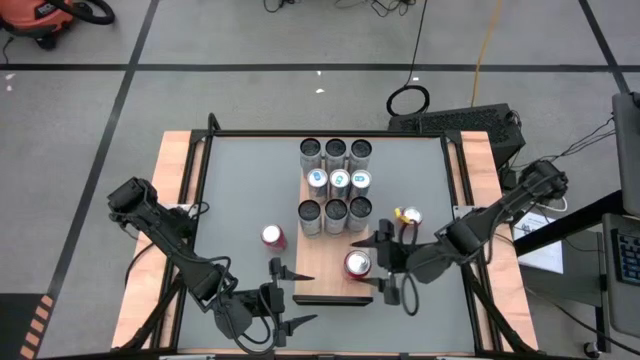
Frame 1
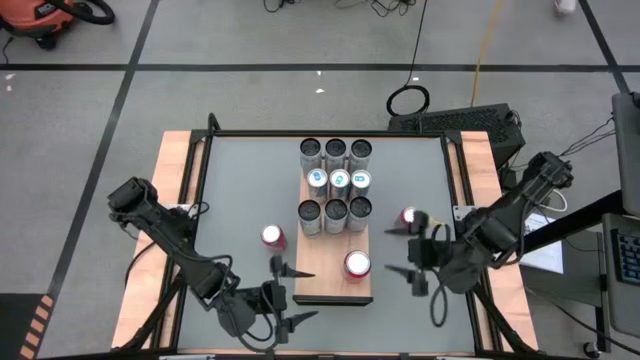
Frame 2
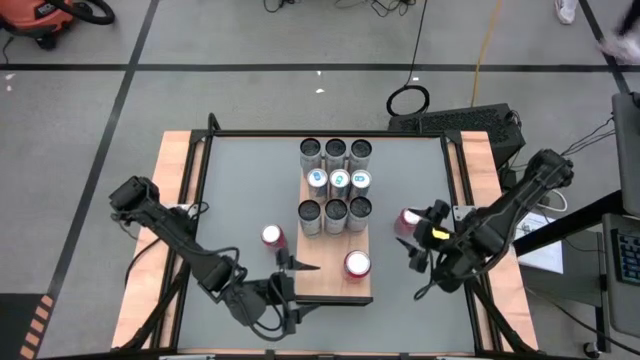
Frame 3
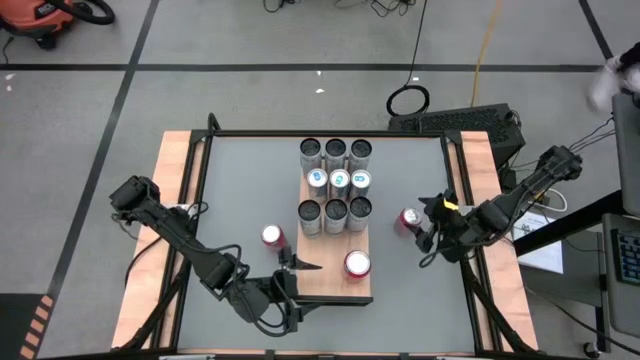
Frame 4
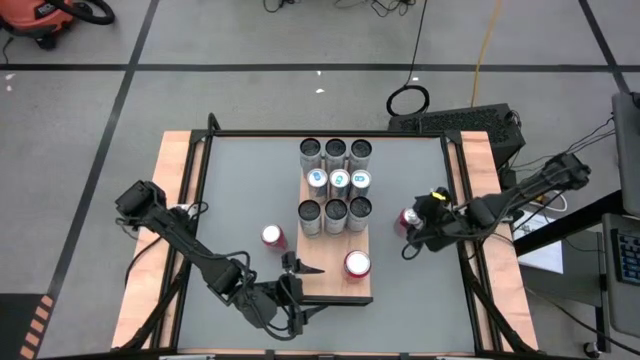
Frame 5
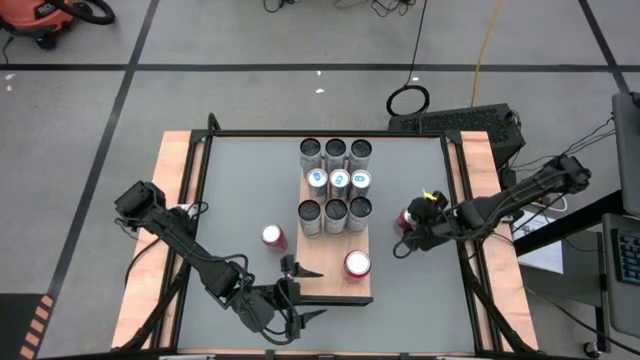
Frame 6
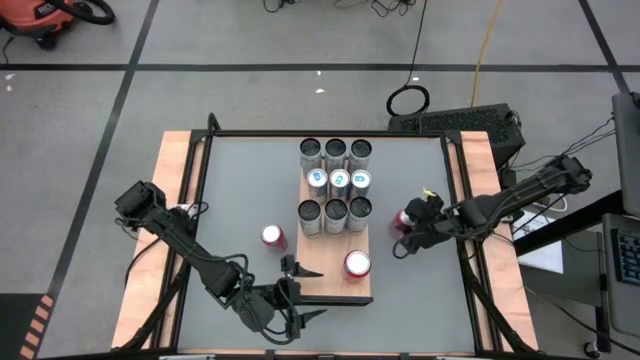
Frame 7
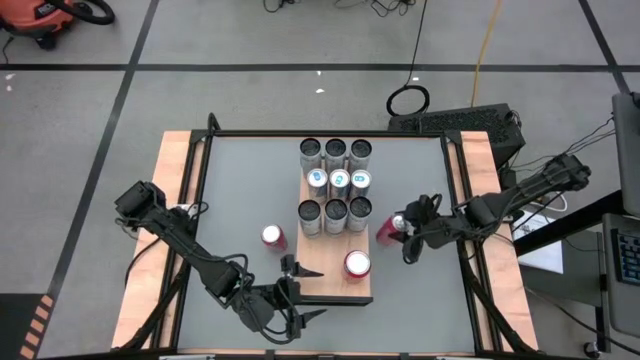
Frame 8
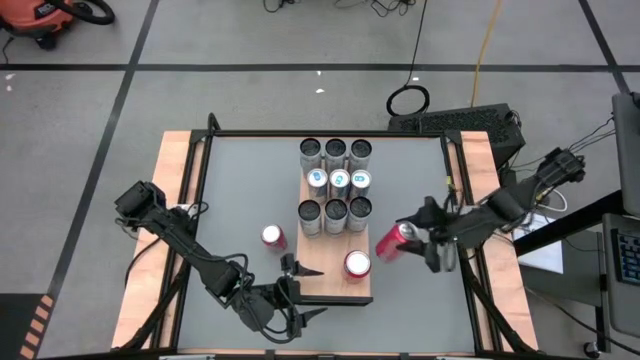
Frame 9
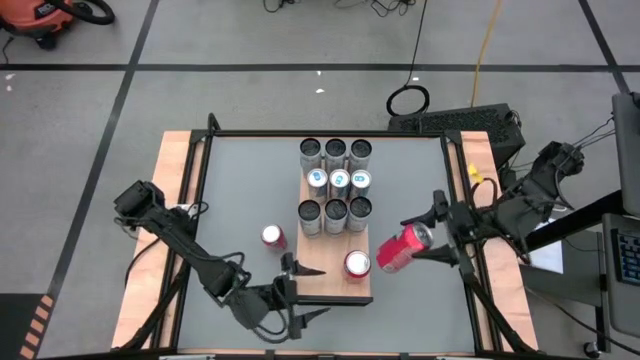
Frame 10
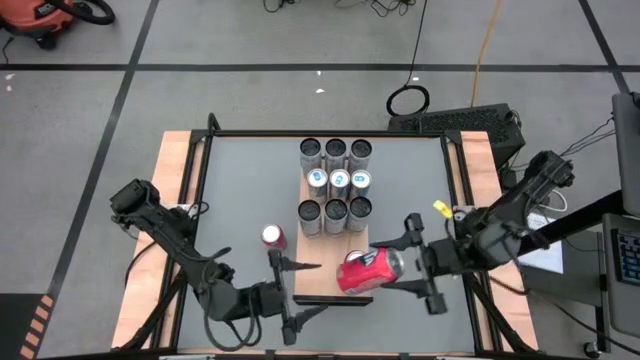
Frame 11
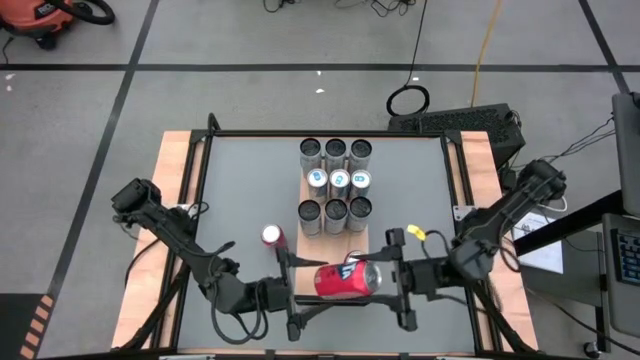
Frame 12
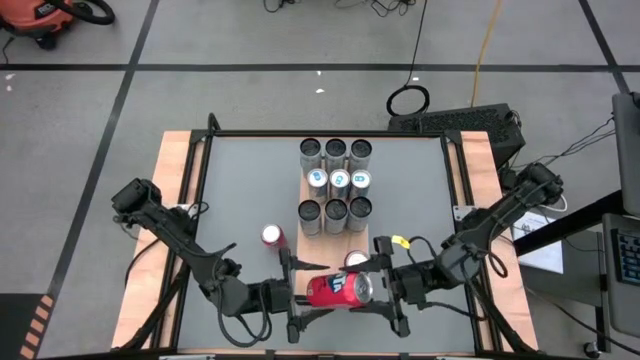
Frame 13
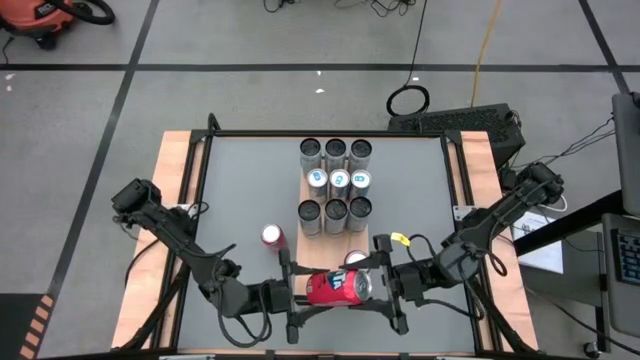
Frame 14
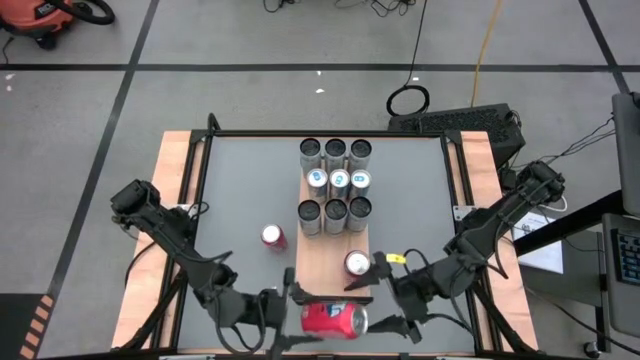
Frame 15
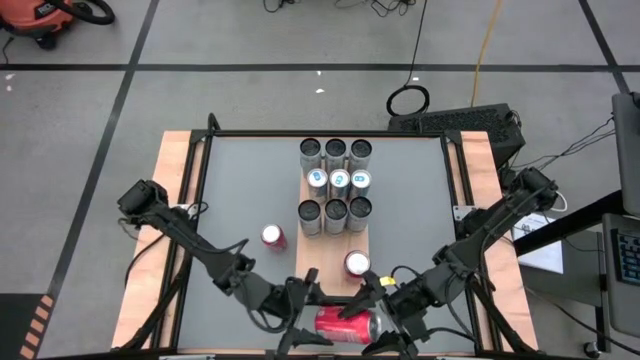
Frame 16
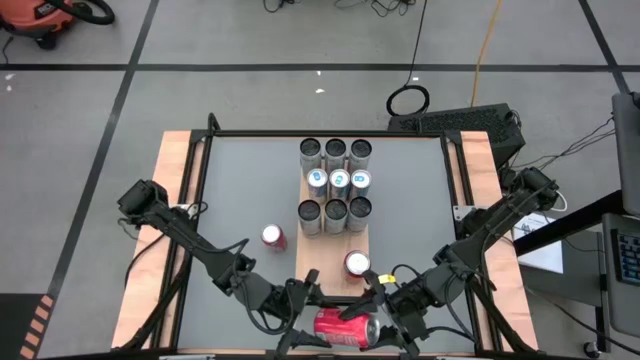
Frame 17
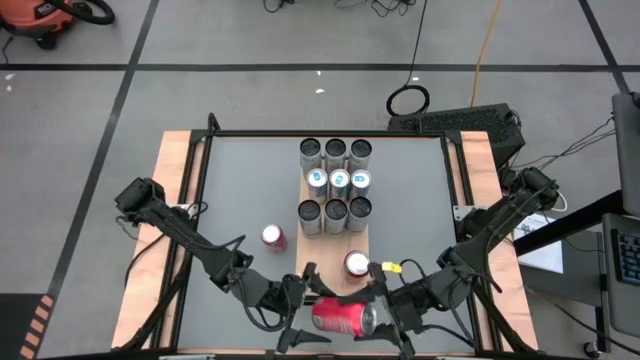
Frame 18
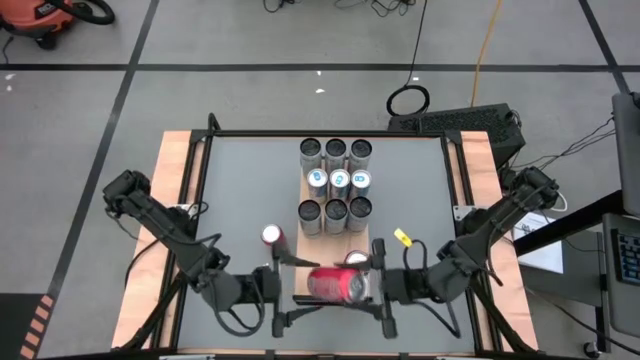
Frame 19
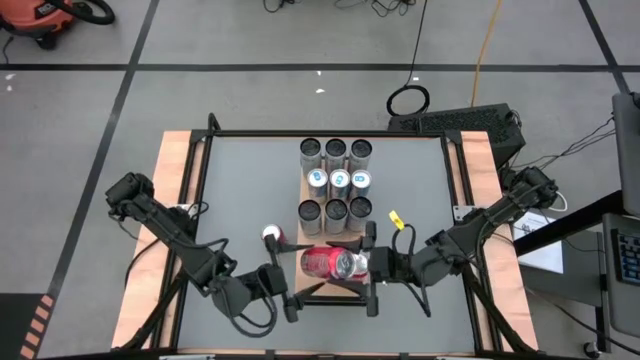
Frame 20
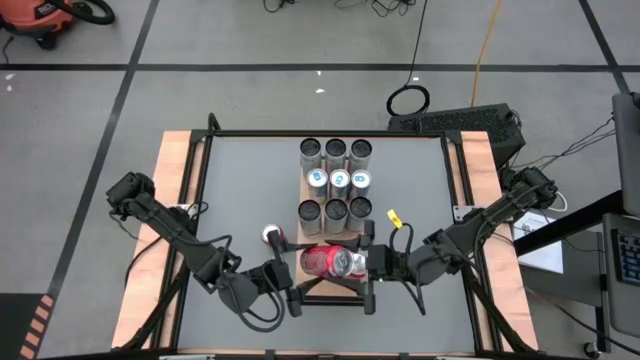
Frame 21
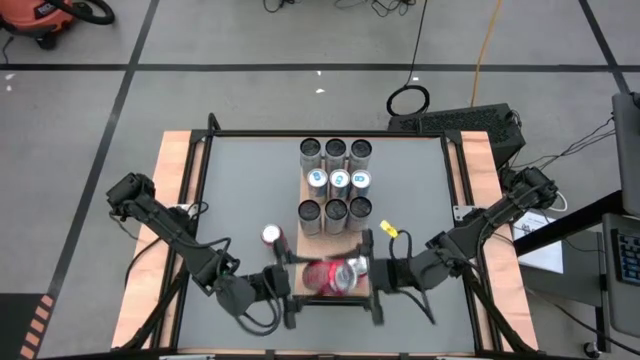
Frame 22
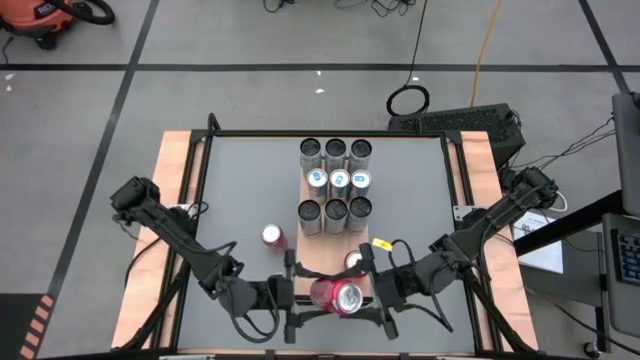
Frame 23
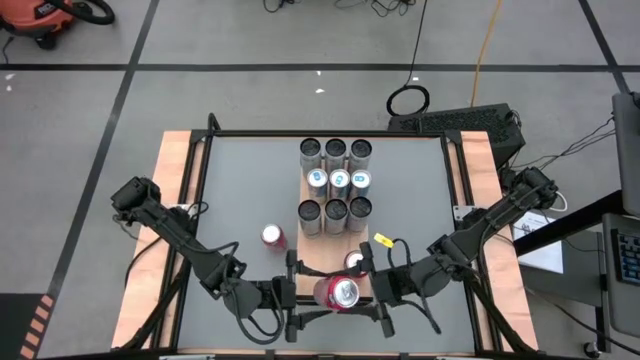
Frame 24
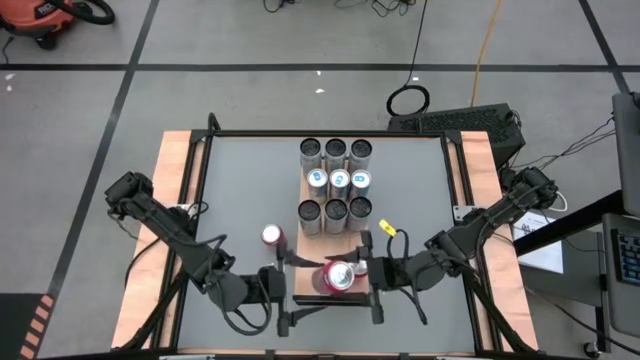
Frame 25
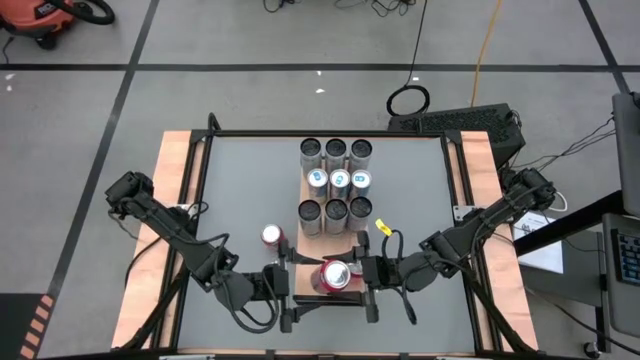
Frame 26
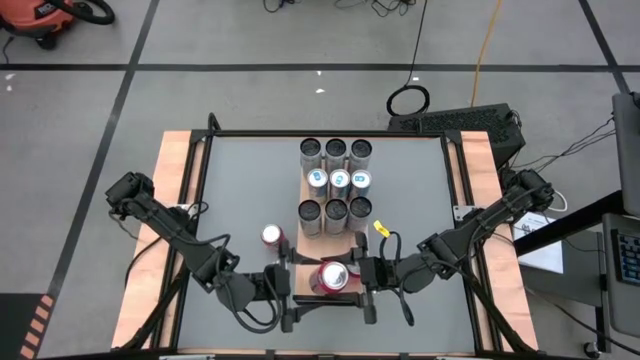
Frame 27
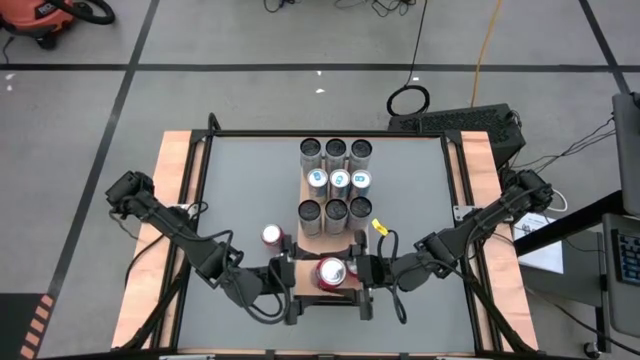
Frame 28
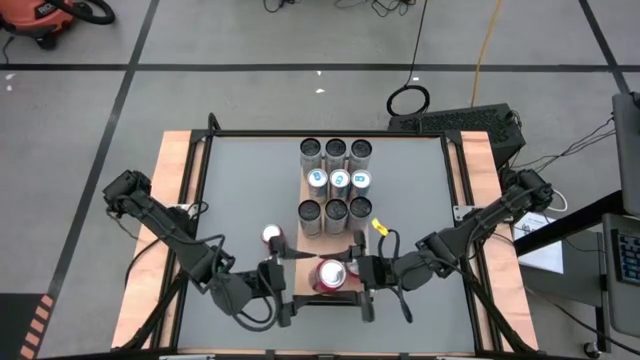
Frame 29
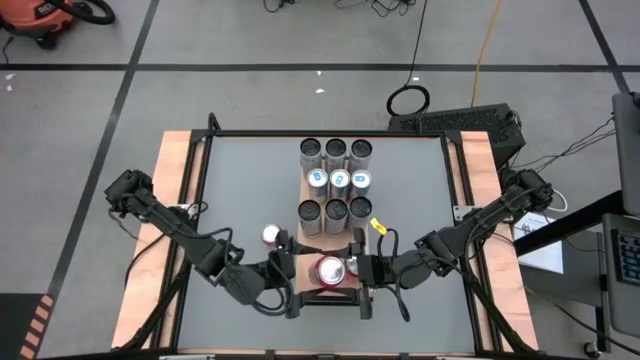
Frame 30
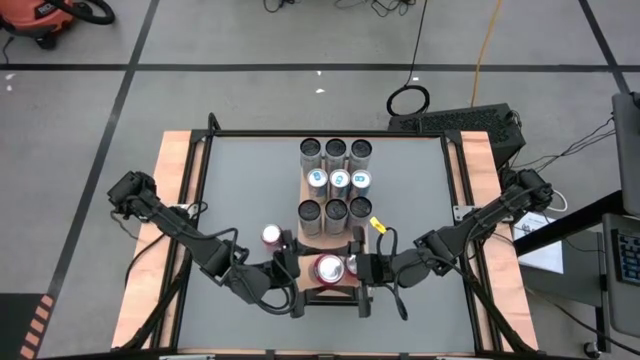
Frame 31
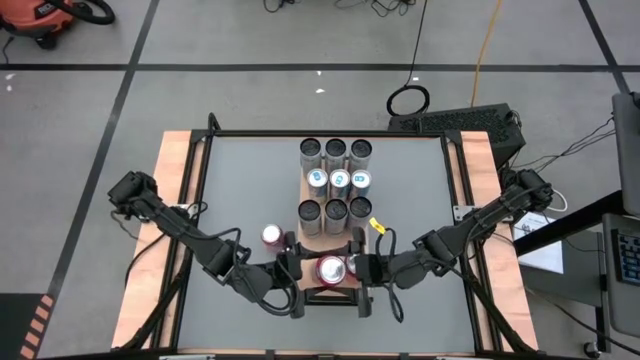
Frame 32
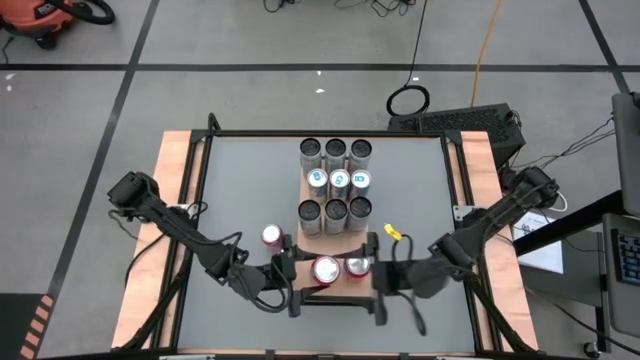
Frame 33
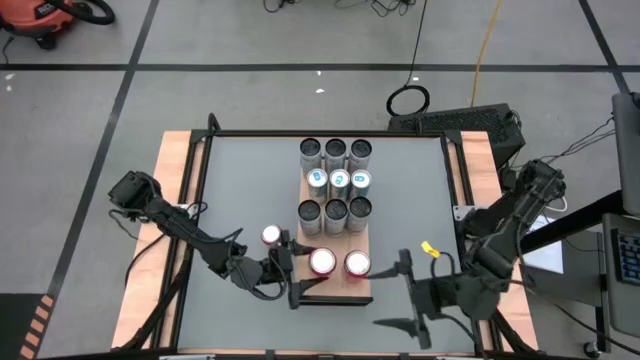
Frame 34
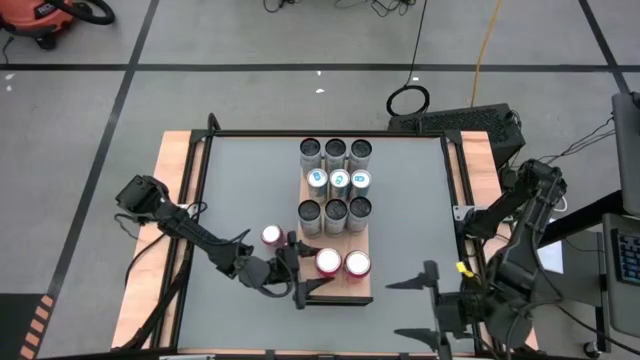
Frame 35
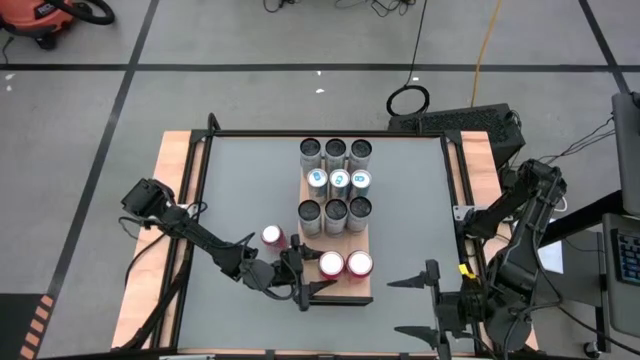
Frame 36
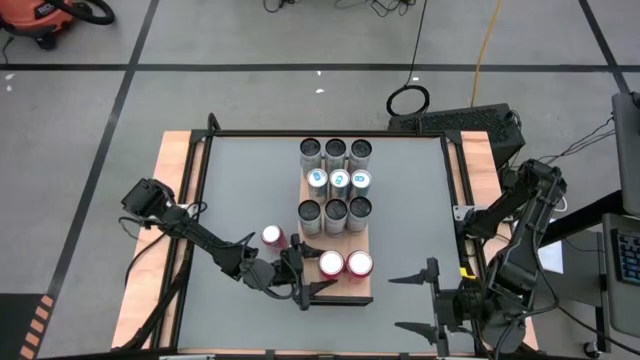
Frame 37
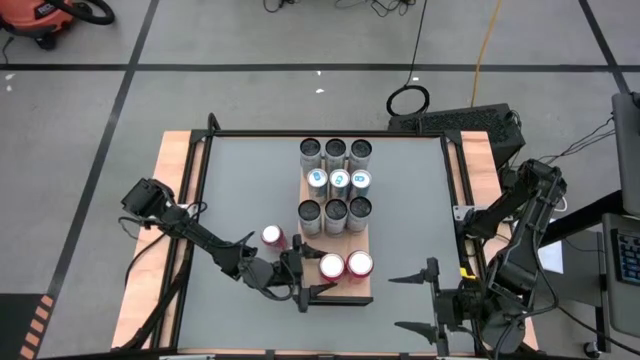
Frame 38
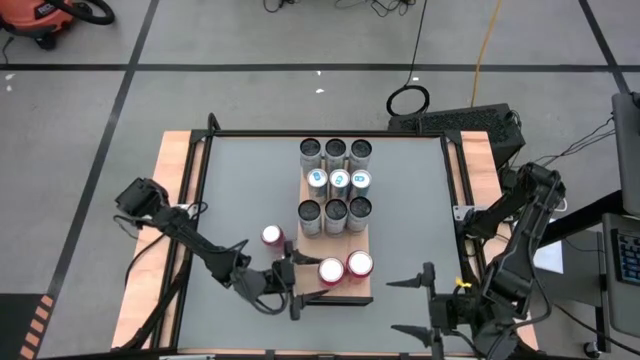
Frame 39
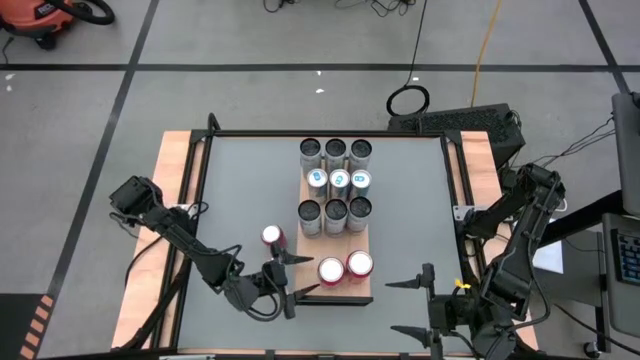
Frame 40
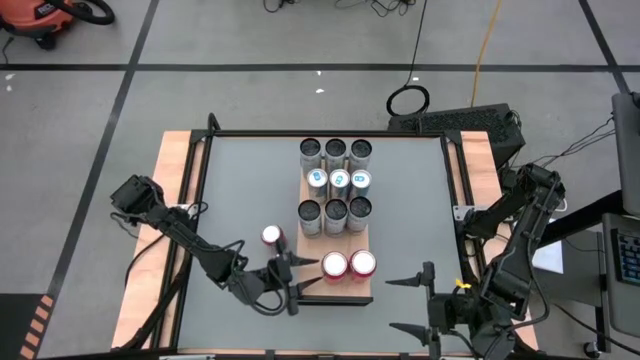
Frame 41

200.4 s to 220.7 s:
Task: Place canned beverage on shelf
Put the right red soda can on the shelf aligned with the other red soda can
